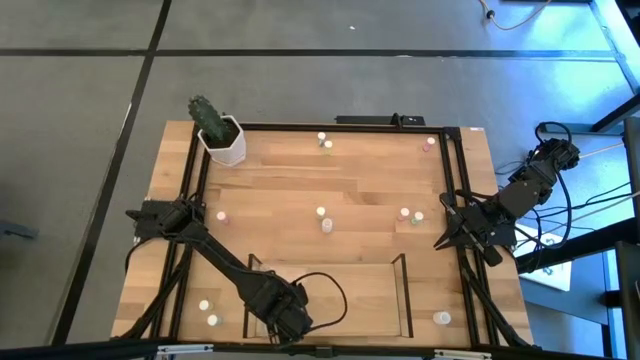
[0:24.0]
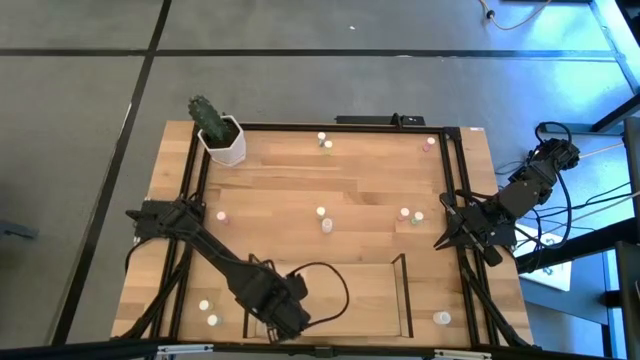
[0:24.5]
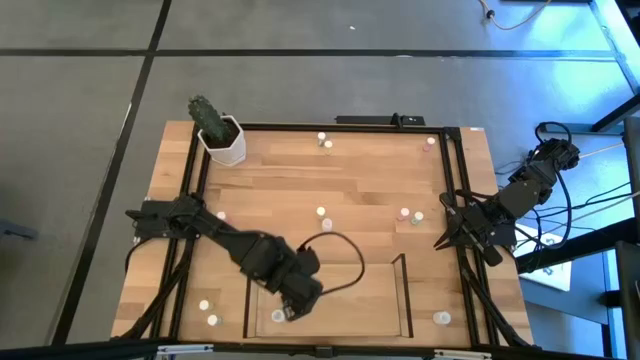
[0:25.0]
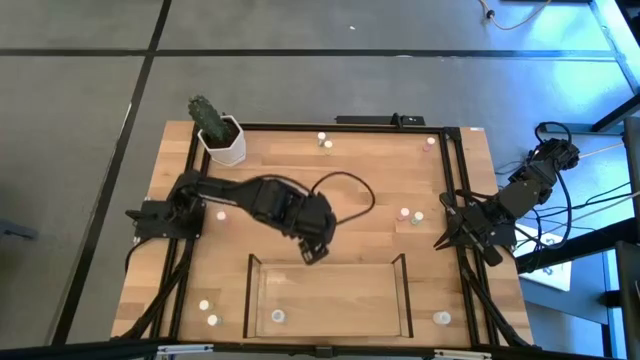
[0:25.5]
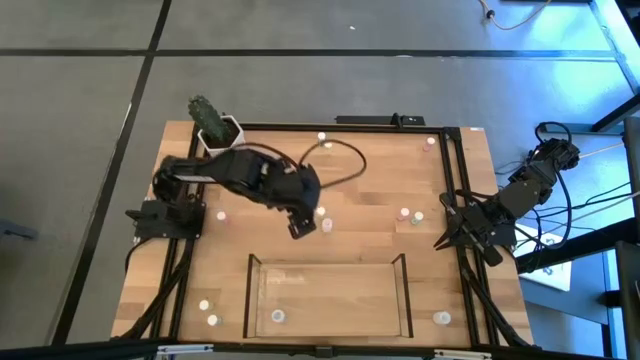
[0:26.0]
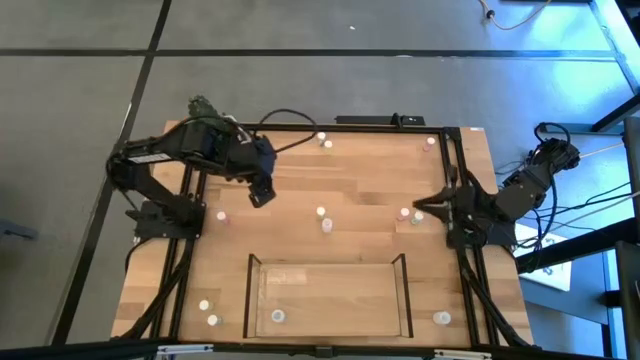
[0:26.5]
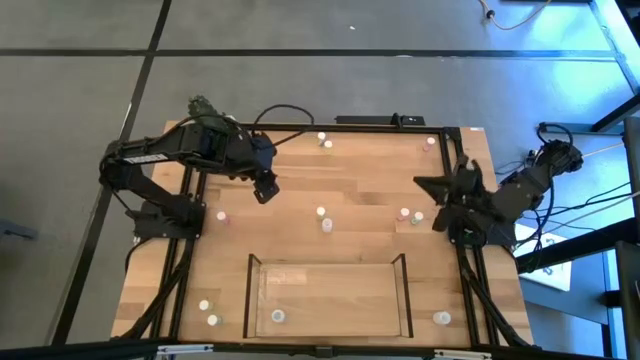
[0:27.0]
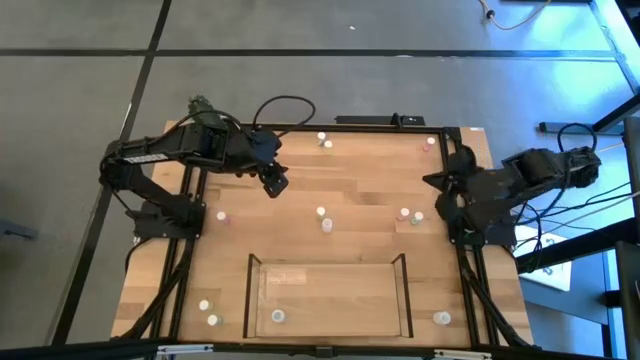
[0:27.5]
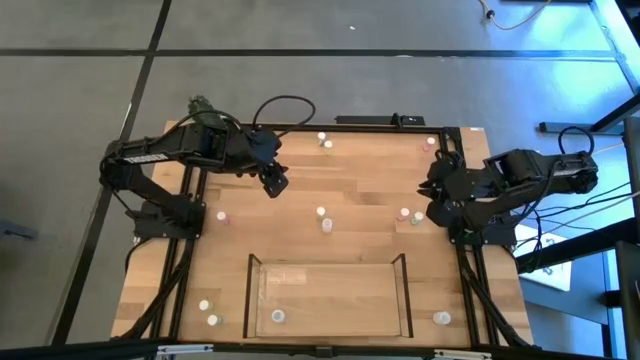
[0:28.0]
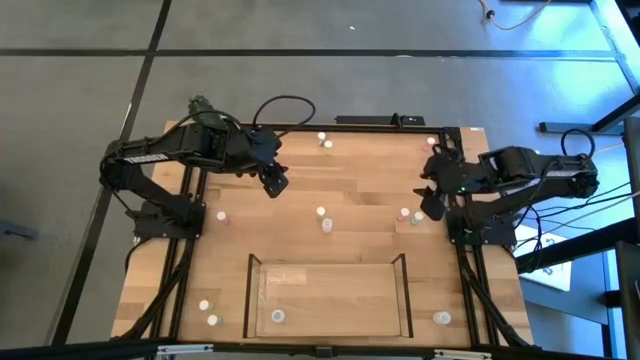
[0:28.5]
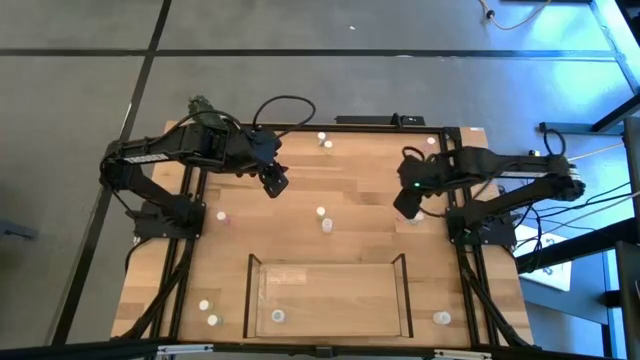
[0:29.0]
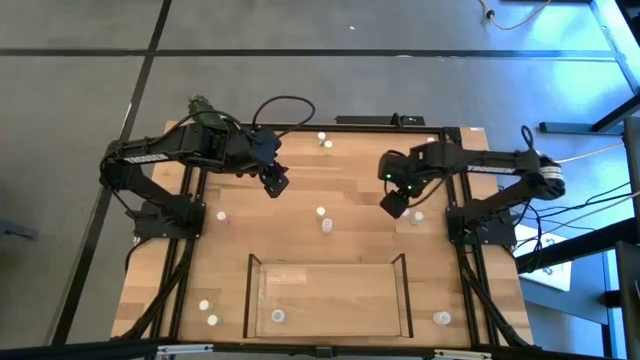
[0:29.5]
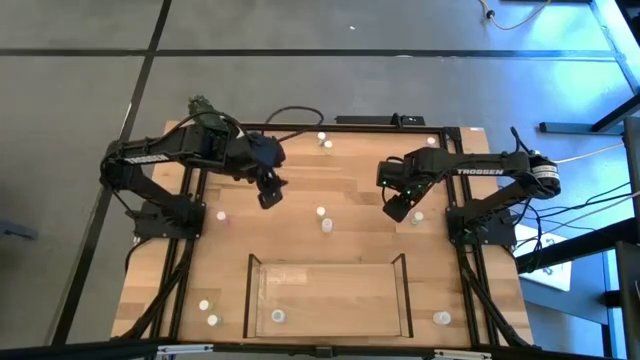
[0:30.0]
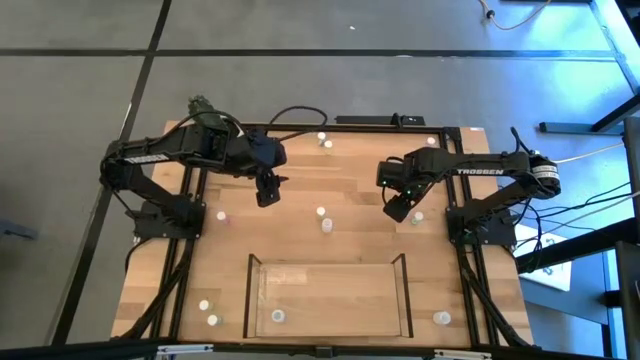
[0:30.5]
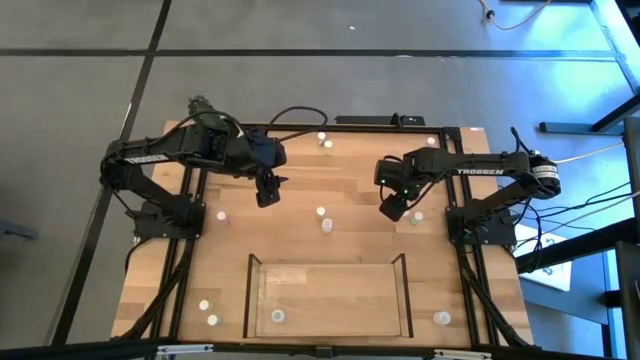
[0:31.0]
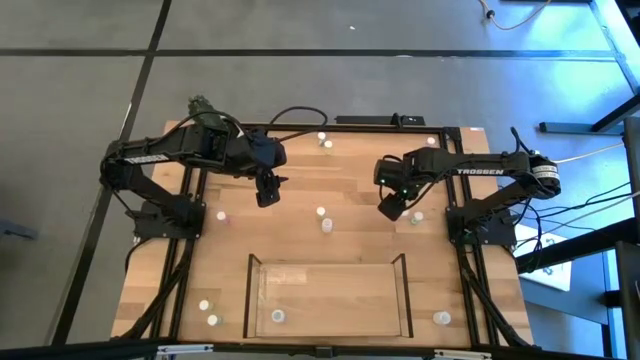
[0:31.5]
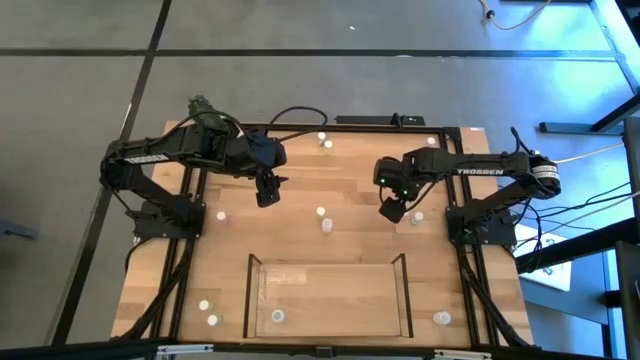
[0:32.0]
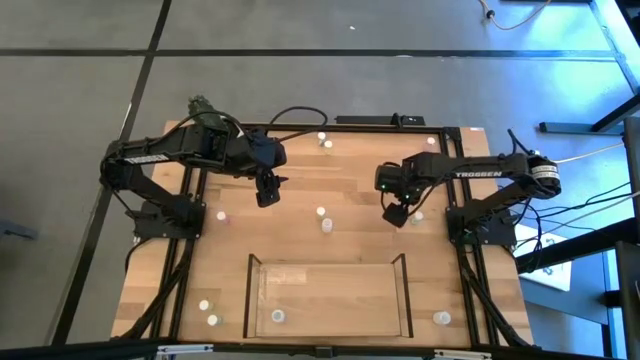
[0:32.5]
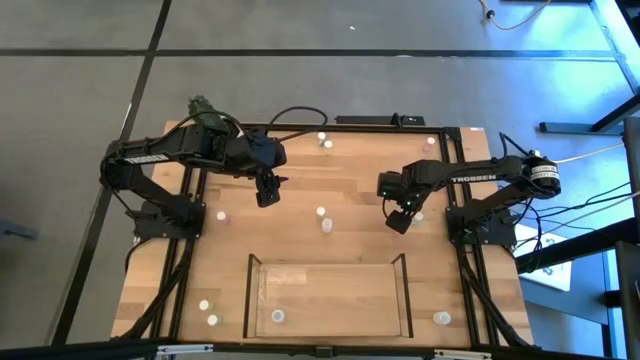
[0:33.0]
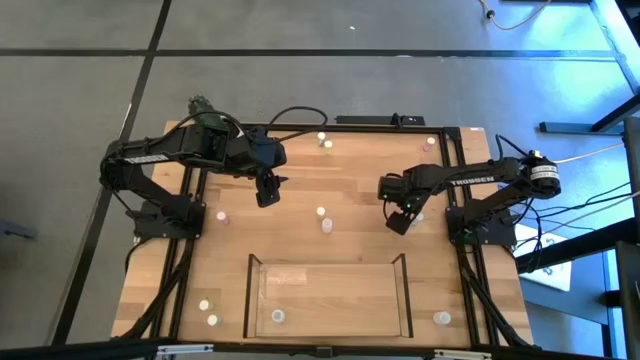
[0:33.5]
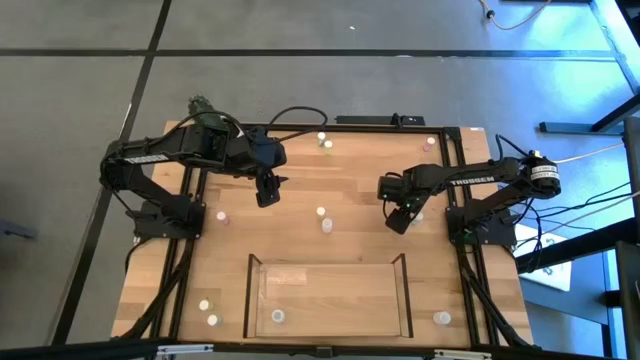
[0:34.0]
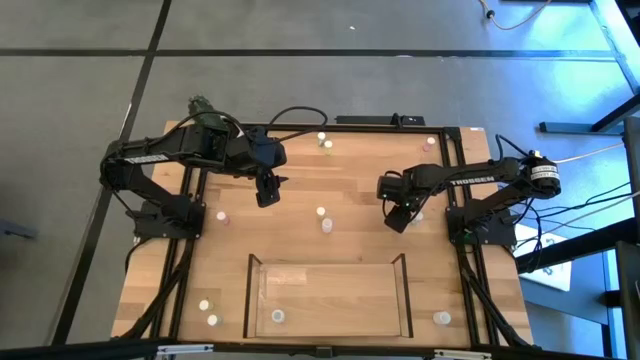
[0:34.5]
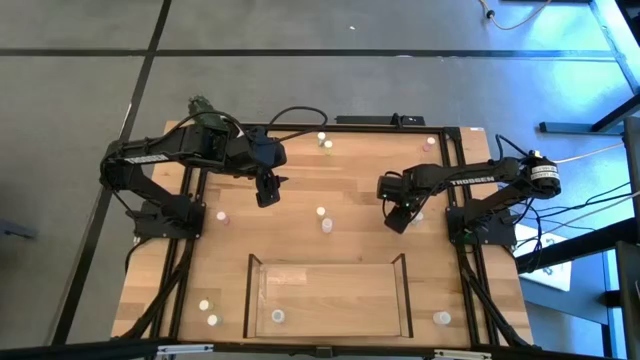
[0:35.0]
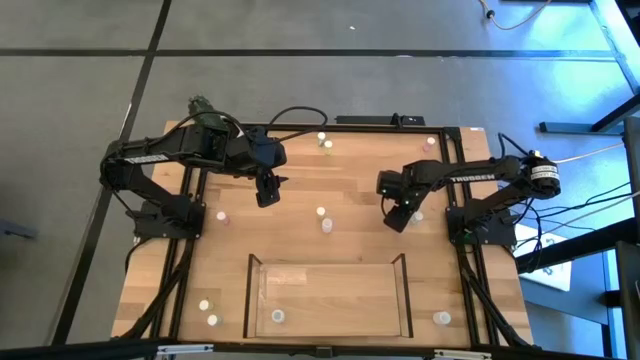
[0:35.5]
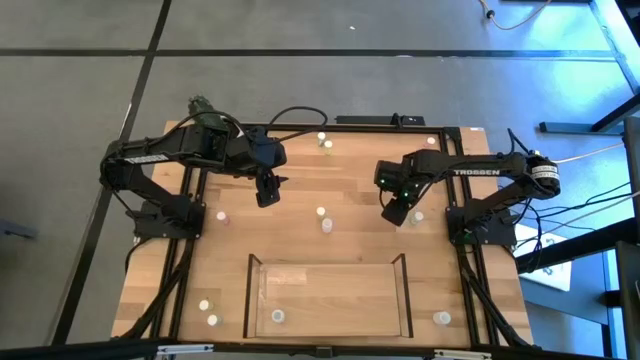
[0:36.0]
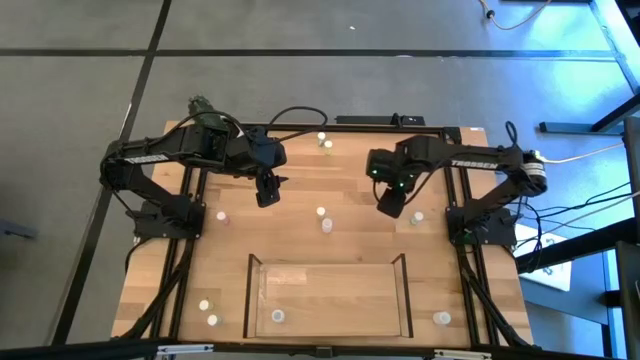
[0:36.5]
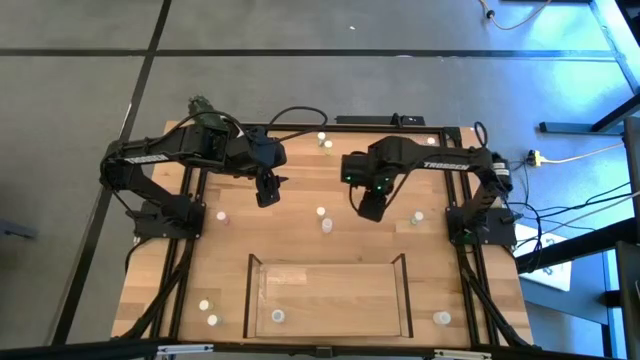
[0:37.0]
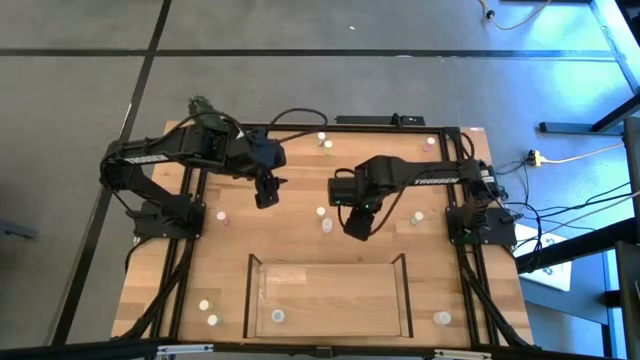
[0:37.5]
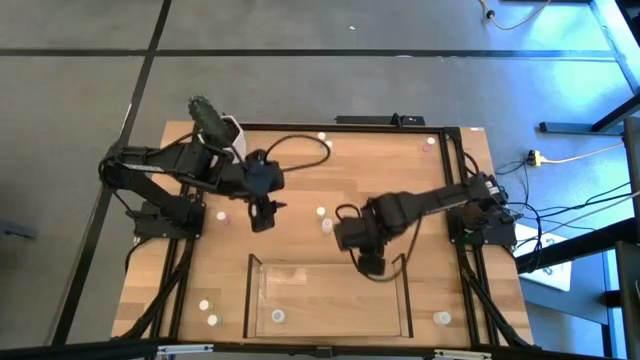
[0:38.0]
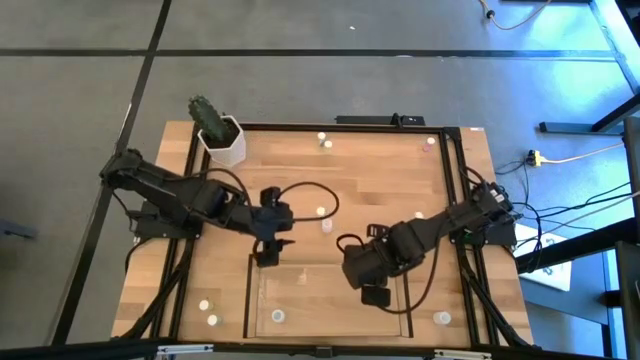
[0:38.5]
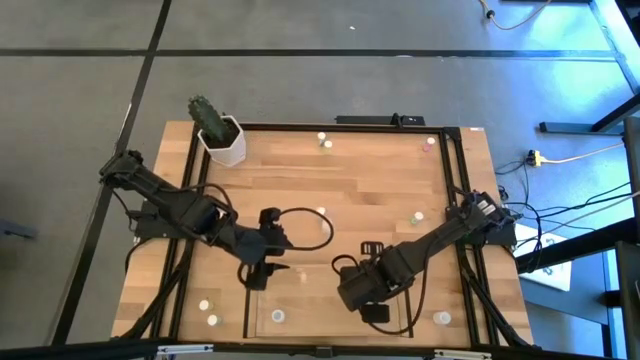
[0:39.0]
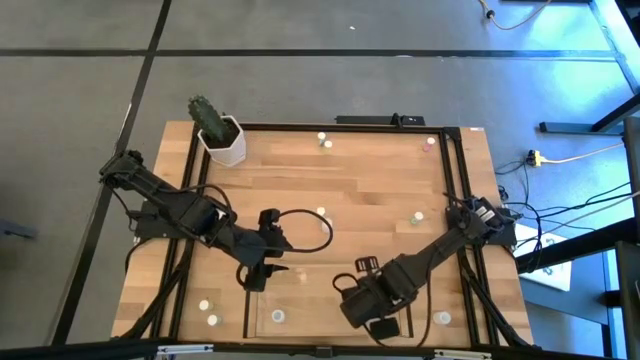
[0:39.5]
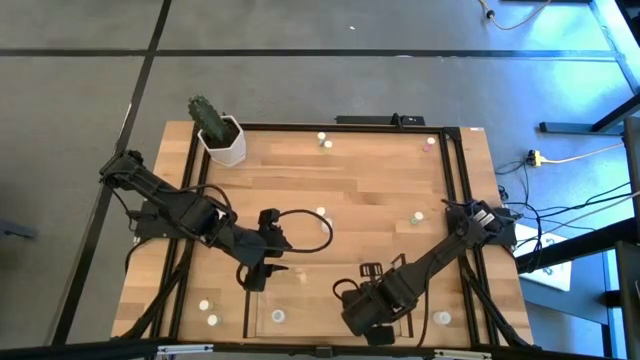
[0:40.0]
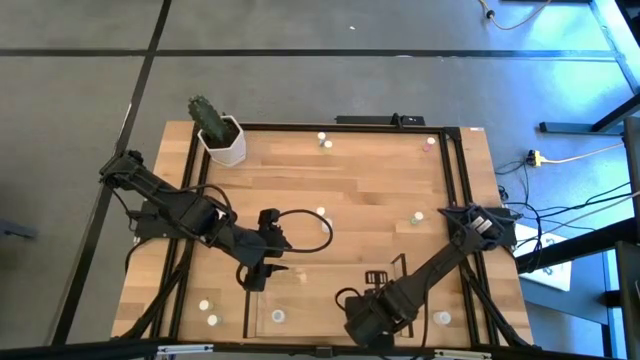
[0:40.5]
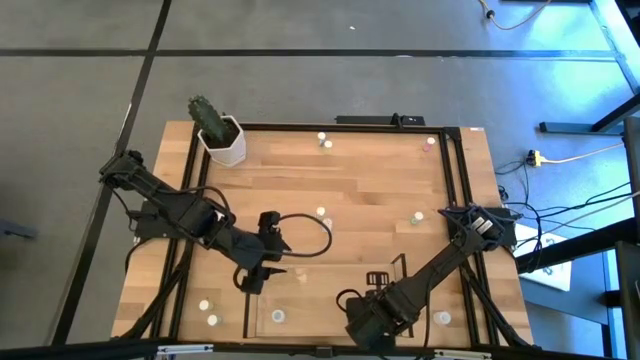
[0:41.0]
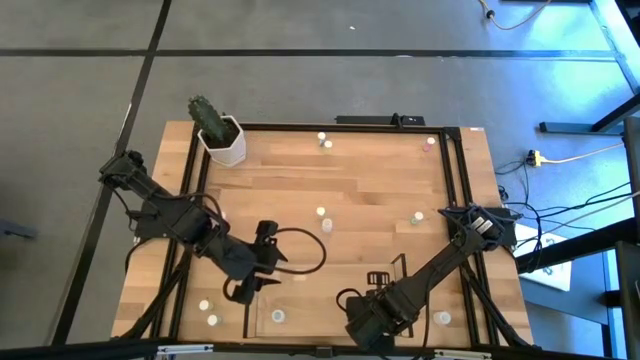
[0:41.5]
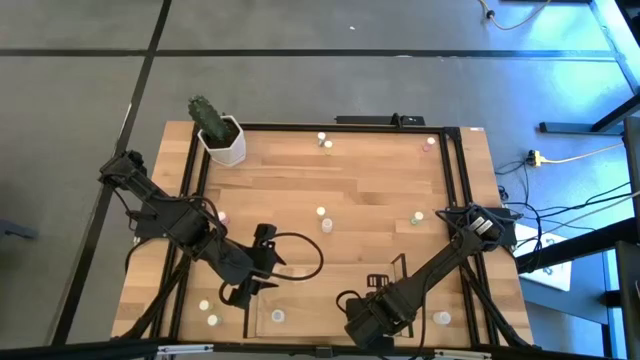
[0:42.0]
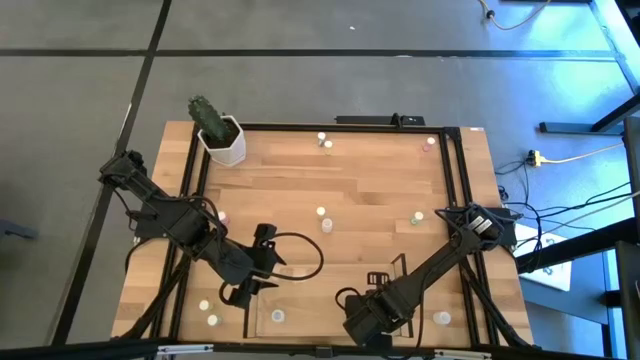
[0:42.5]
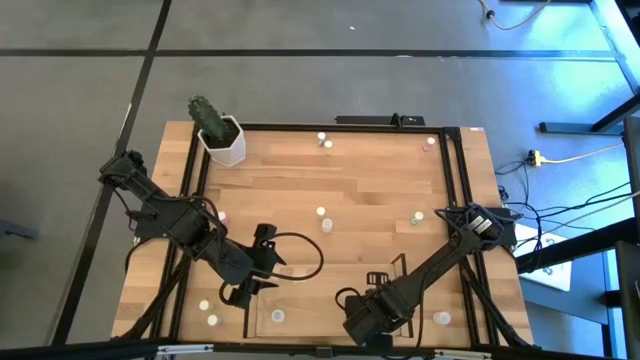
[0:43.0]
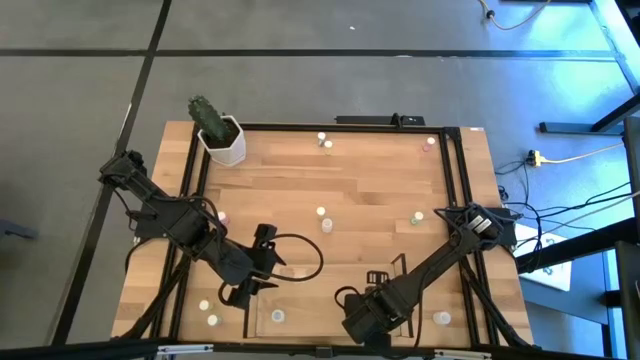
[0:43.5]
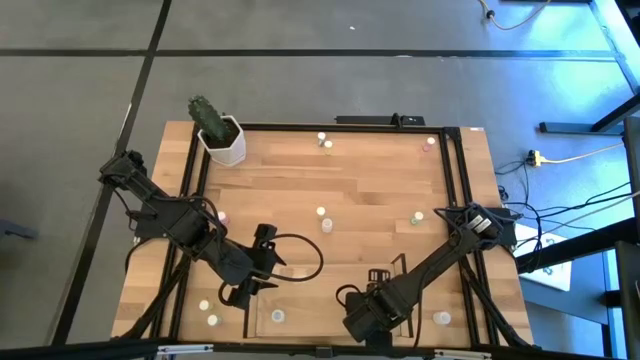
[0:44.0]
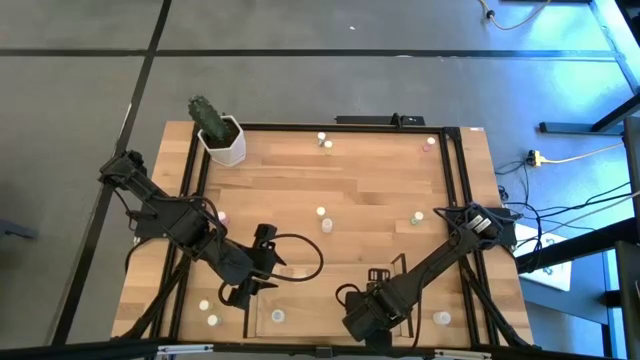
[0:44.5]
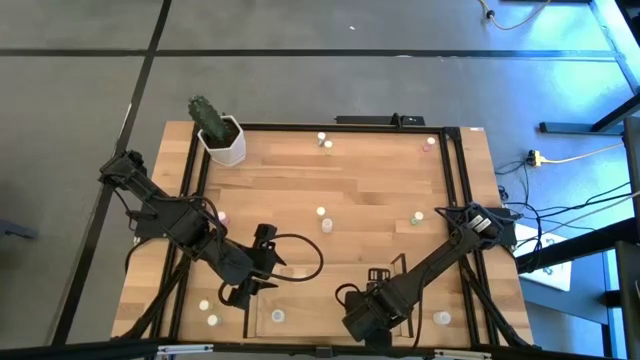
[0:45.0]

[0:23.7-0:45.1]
Task: Pick and place medicine bottles onto shelf by color
Put the bottom right pink pill bottle on the shelf
